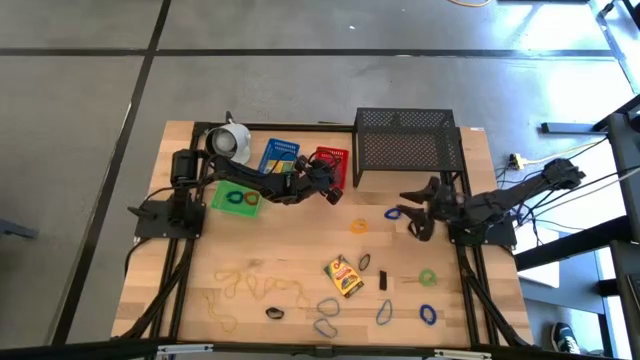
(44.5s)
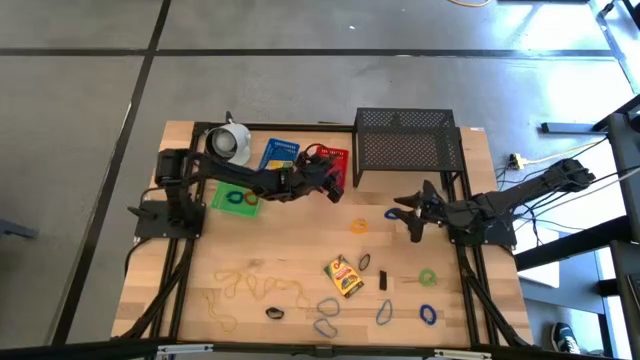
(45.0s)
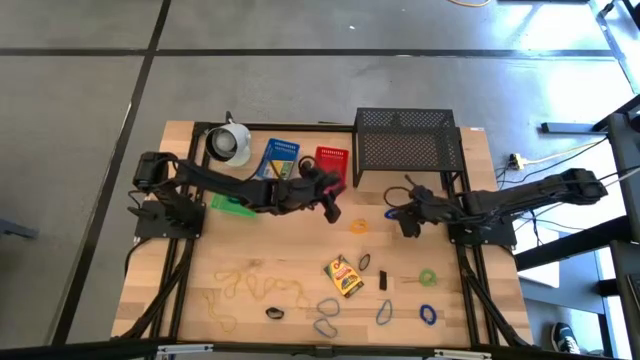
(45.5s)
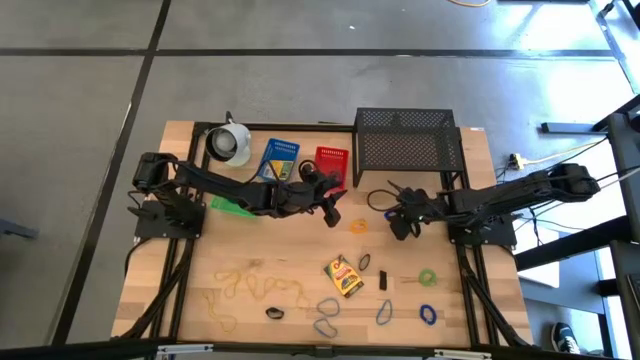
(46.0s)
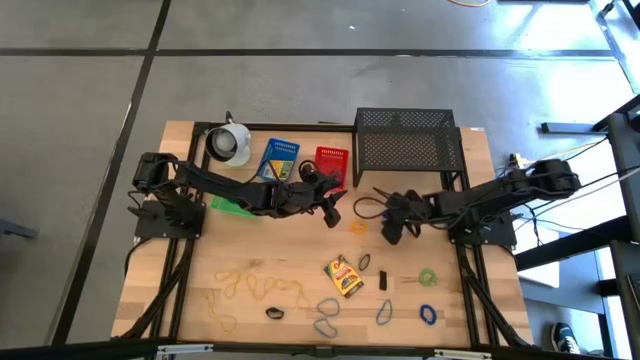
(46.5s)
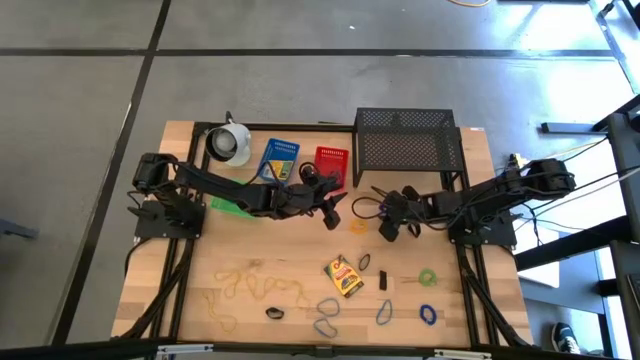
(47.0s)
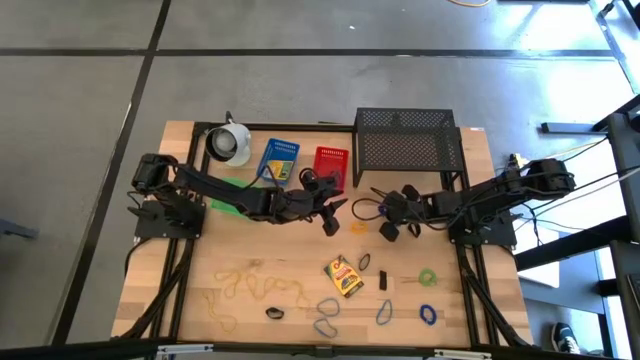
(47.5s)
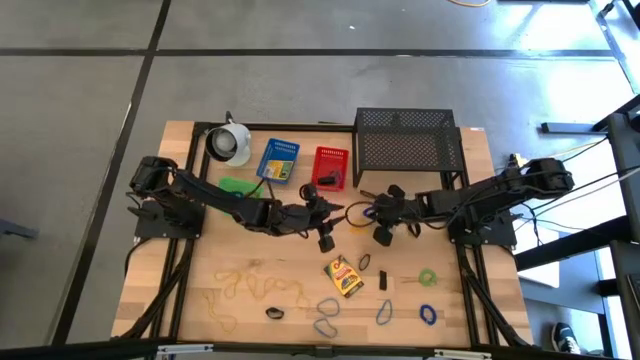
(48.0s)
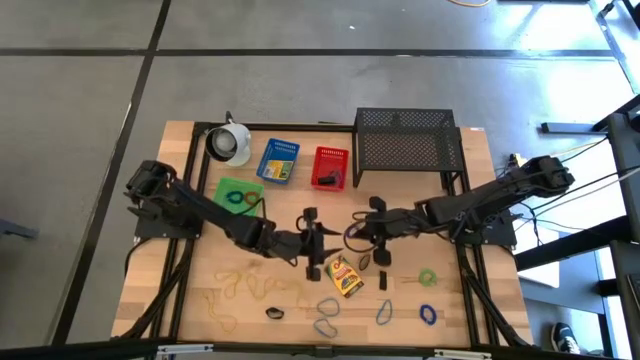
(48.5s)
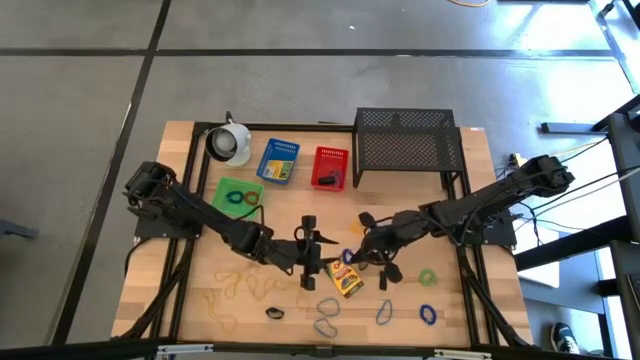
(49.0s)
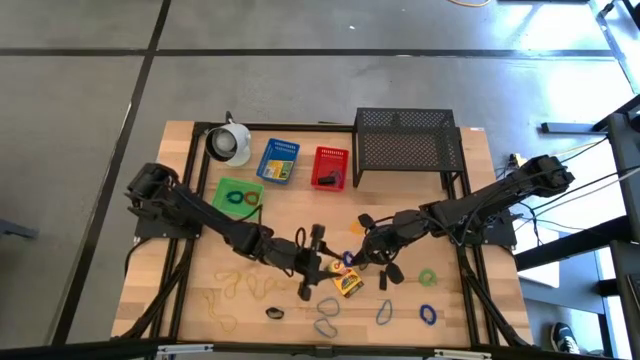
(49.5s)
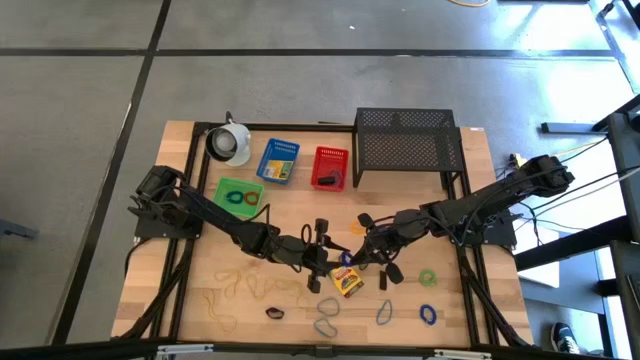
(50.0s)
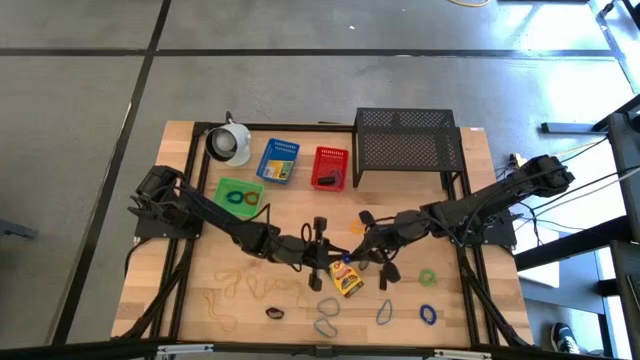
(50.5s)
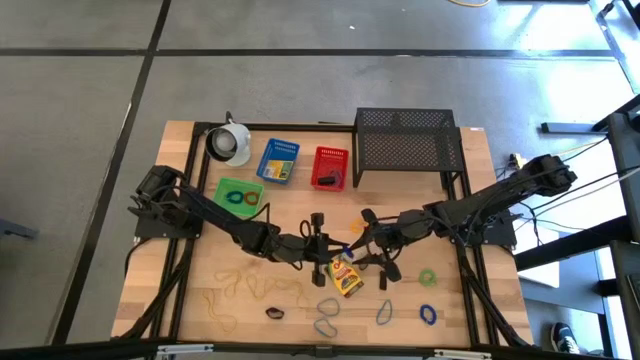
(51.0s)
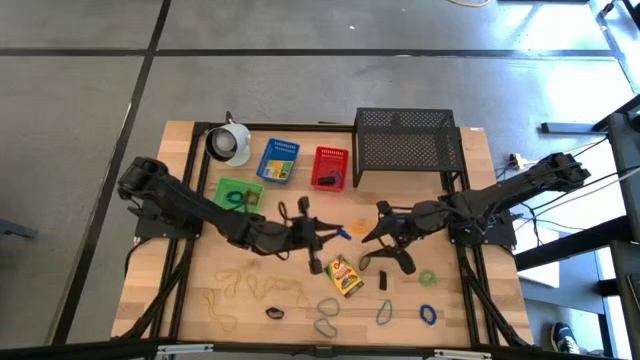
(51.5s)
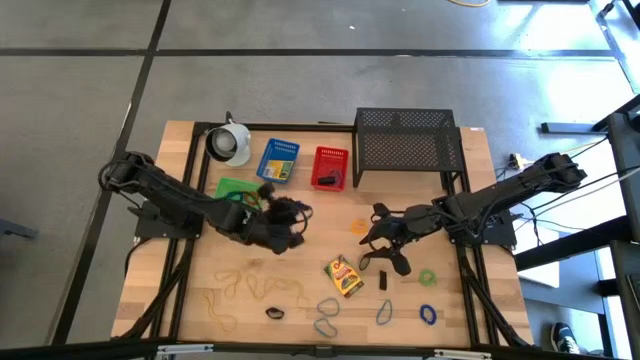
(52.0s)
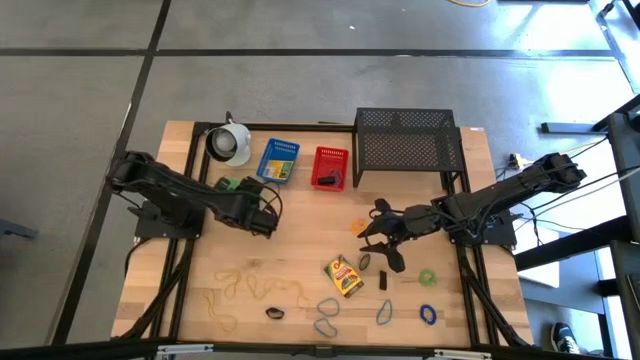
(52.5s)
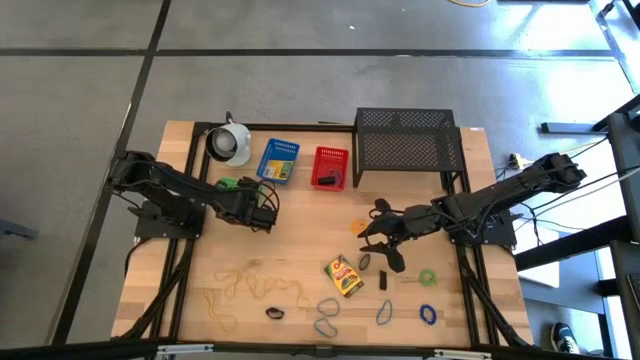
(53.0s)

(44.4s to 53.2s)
Task: Pick & Place Office Desk Supplies
Put the blue spring keychain into the green bin

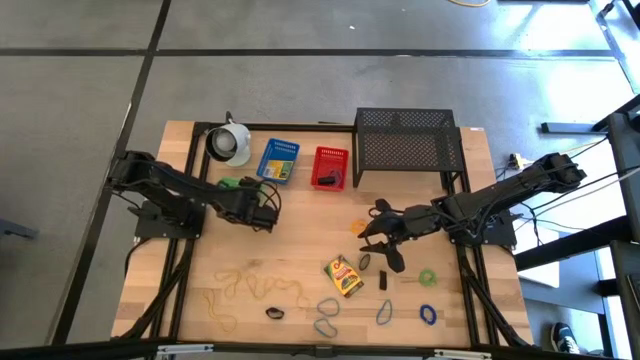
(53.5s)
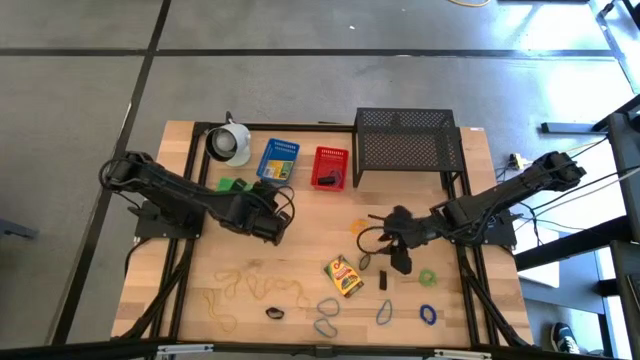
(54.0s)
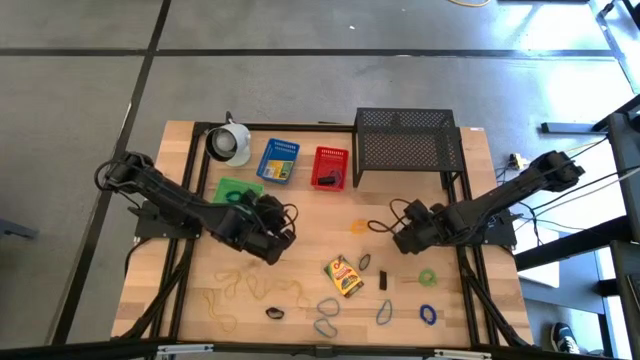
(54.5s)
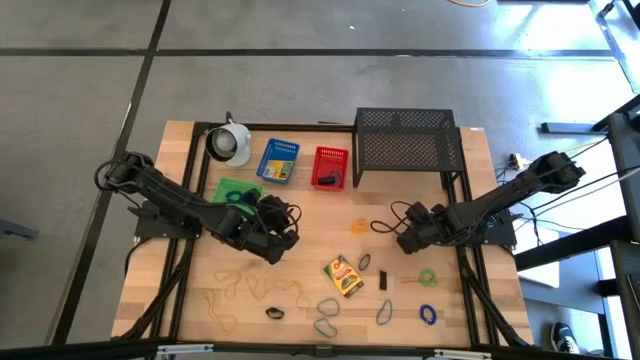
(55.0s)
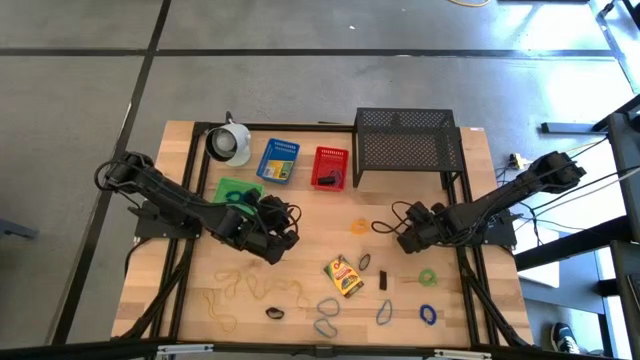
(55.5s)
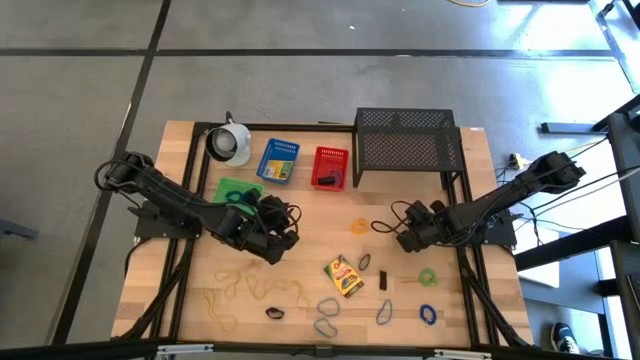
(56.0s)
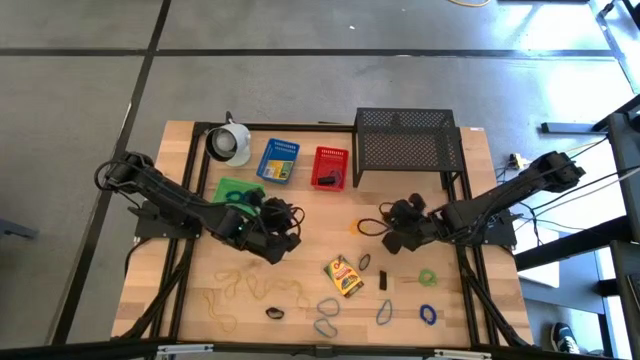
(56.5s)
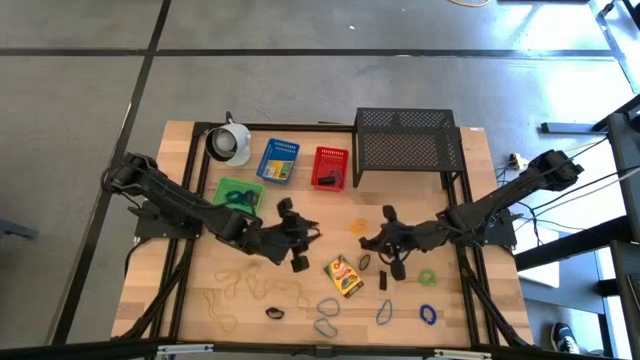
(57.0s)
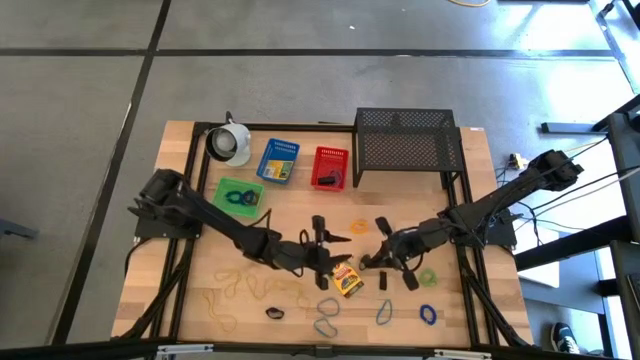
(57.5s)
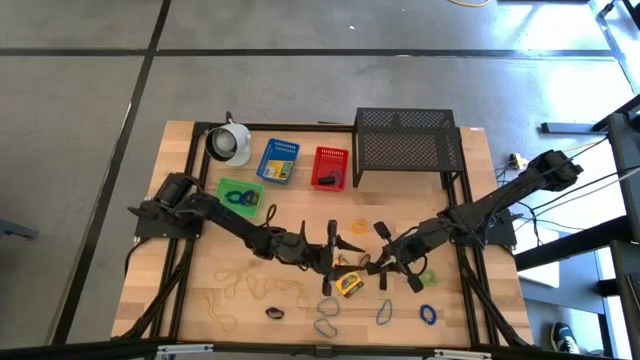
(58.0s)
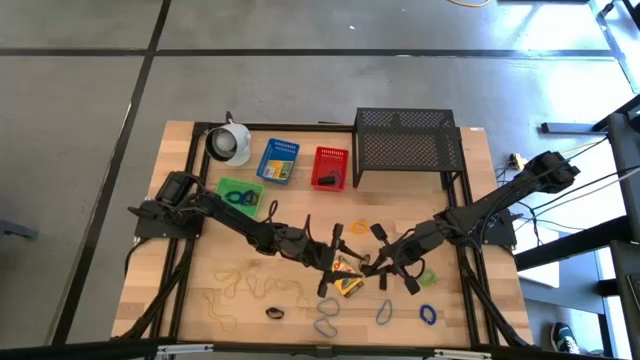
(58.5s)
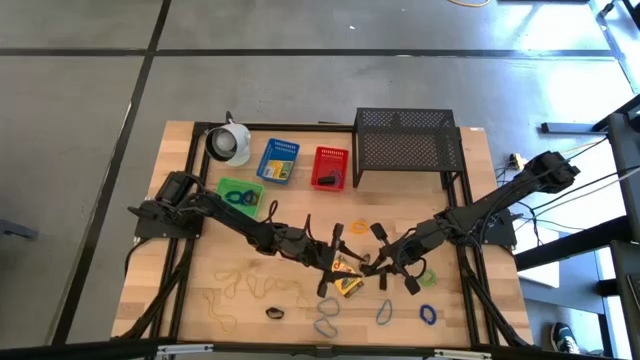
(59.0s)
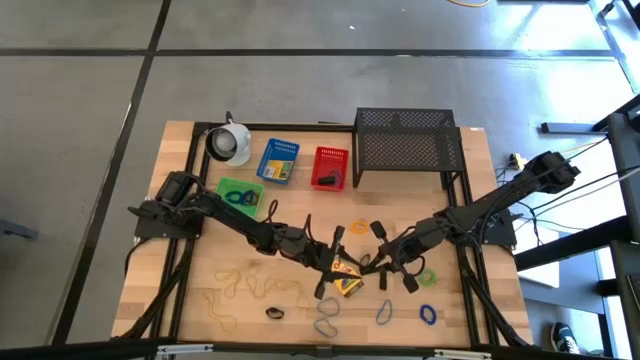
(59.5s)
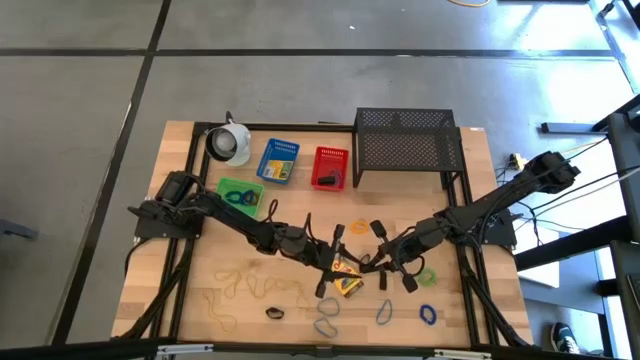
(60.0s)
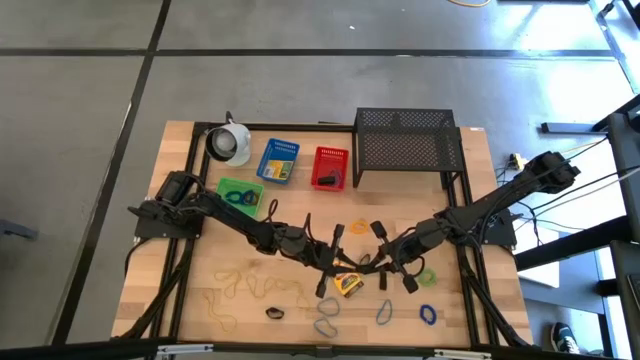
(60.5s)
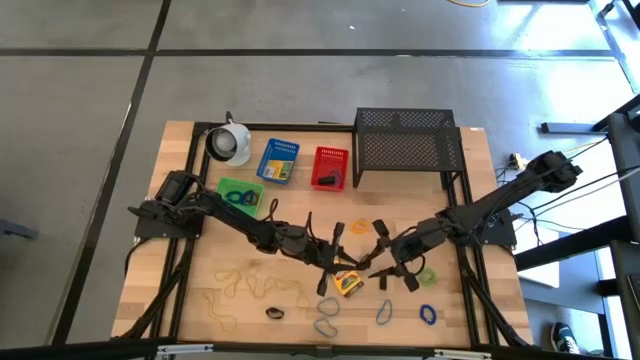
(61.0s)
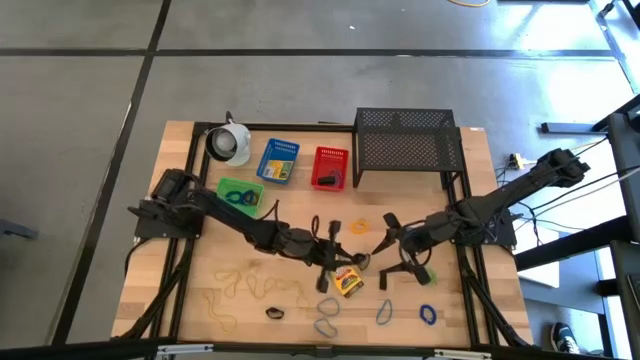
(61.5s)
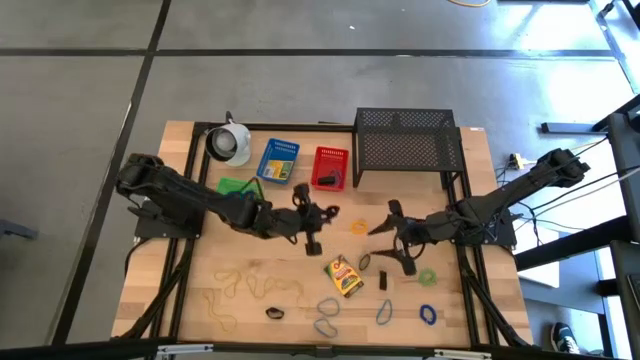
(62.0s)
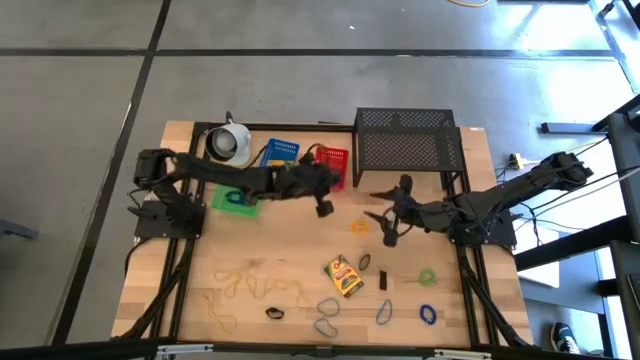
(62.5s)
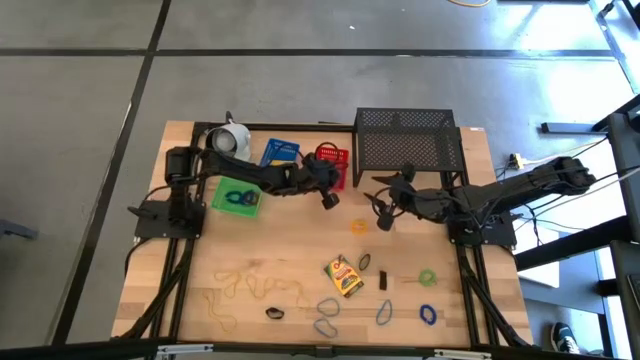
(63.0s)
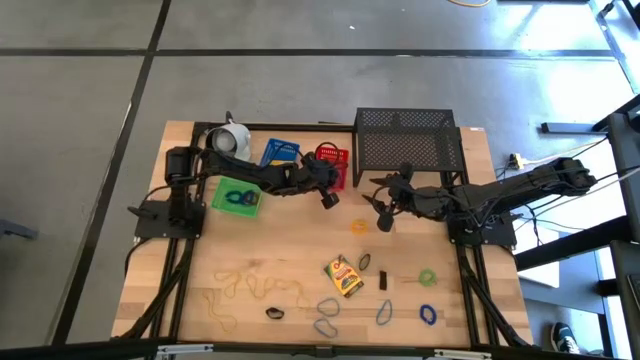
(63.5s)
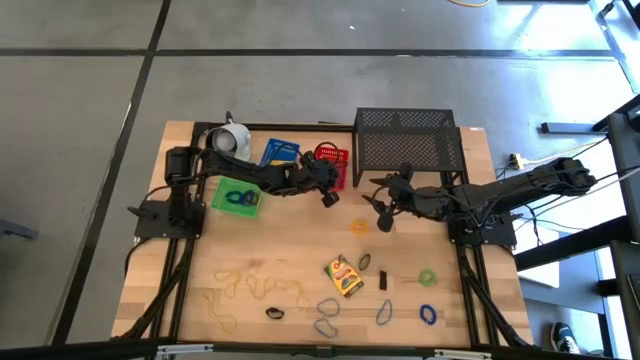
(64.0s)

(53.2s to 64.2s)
Put the black rubber band into the red bin

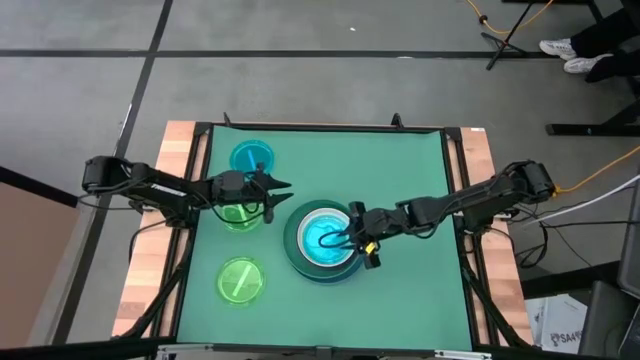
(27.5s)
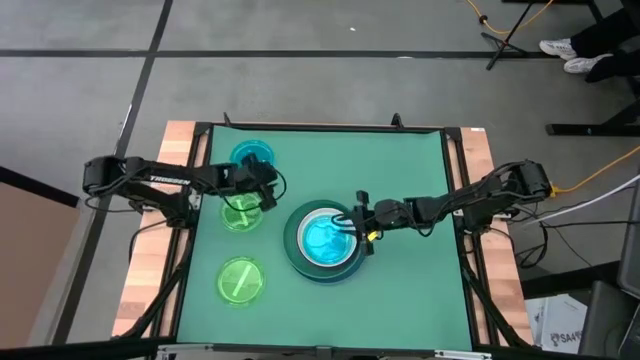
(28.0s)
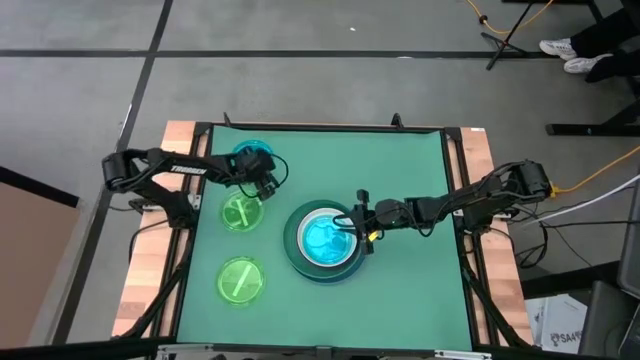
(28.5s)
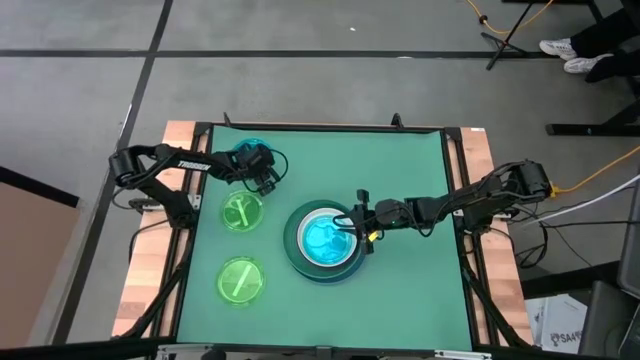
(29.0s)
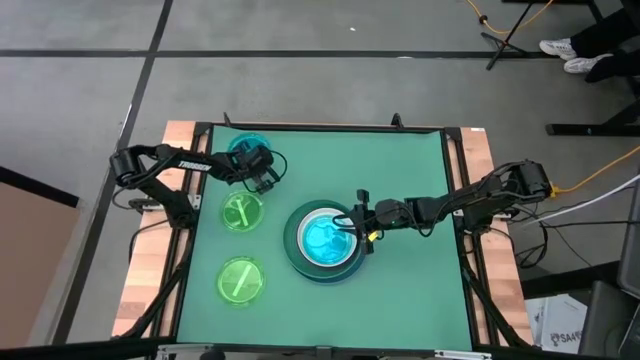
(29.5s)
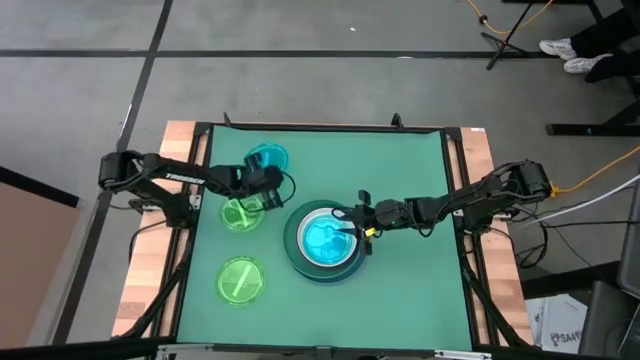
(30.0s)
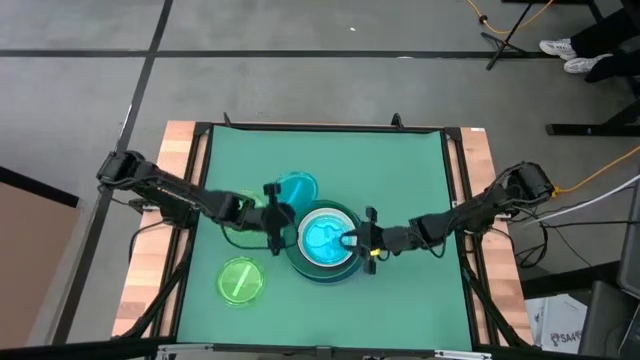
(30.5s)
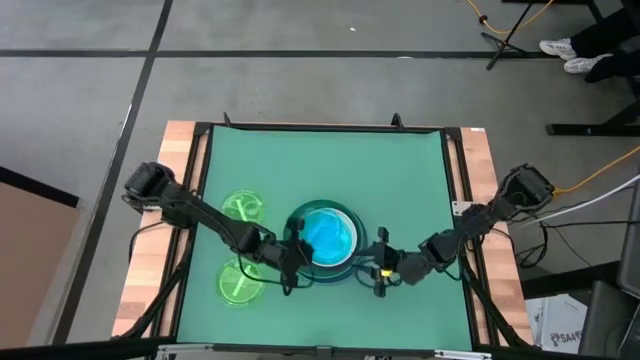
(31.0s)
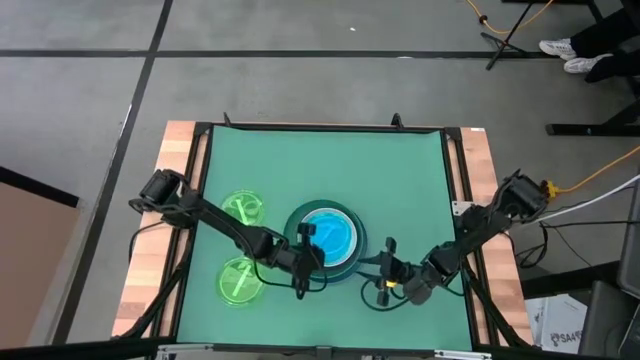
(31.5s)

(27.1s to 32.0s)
Task: Stack plastic plates
Stack the light blue plate on top of the light blue plate
